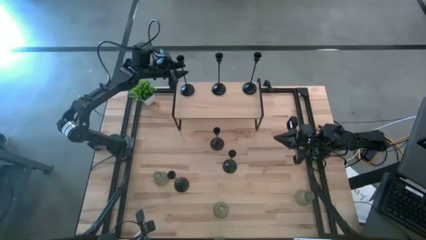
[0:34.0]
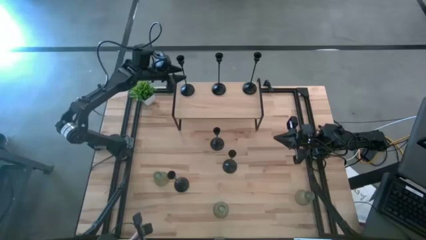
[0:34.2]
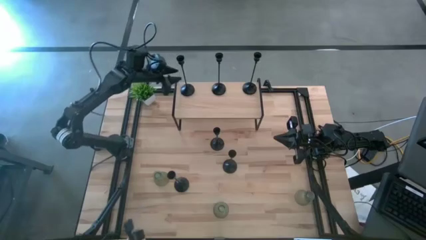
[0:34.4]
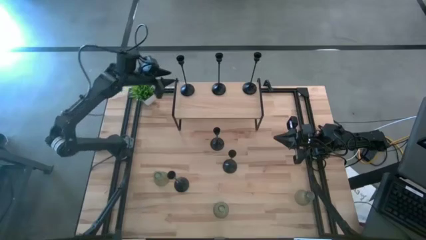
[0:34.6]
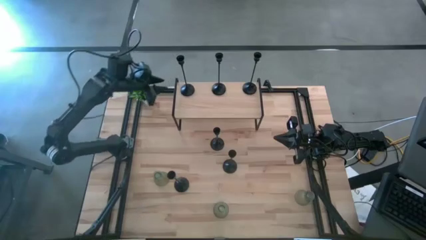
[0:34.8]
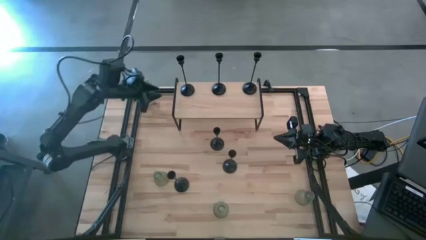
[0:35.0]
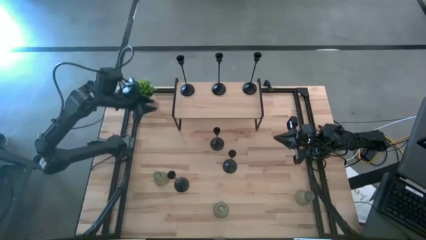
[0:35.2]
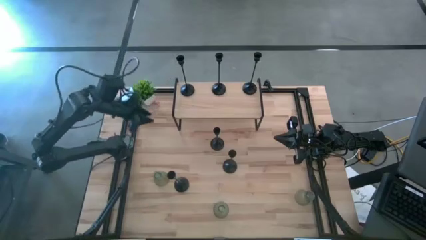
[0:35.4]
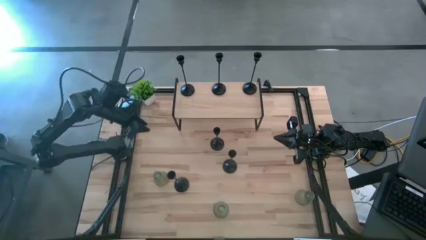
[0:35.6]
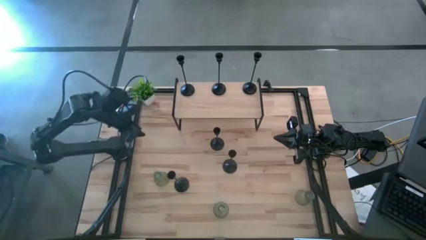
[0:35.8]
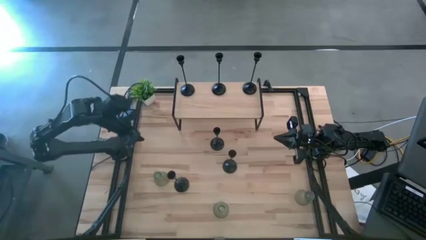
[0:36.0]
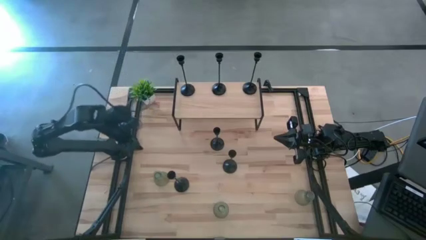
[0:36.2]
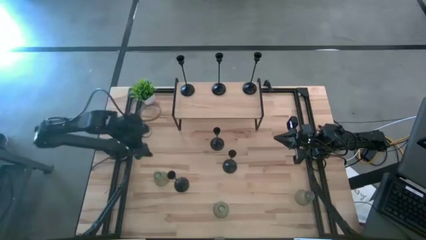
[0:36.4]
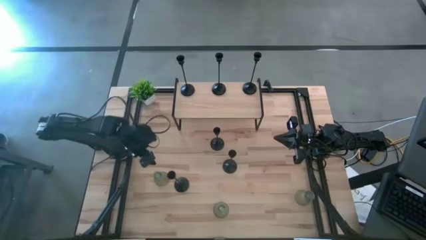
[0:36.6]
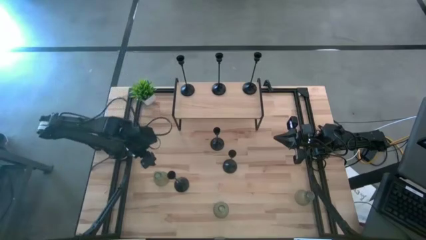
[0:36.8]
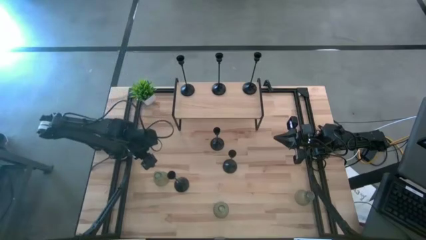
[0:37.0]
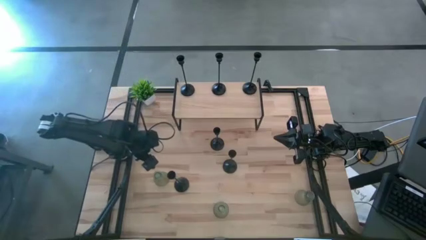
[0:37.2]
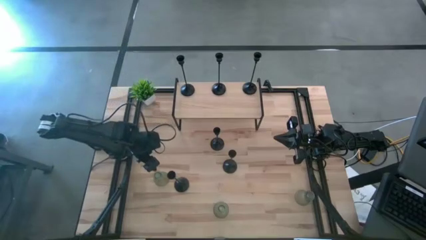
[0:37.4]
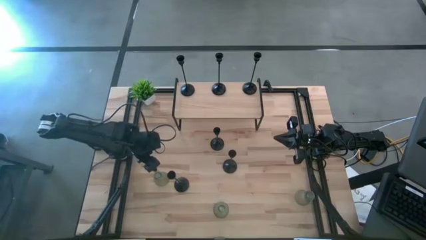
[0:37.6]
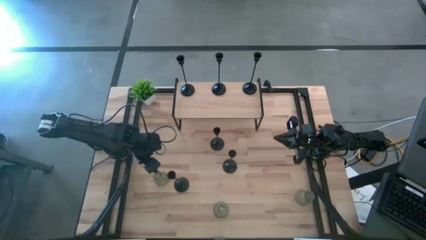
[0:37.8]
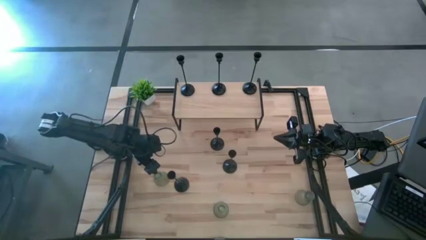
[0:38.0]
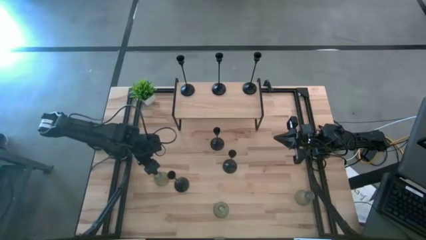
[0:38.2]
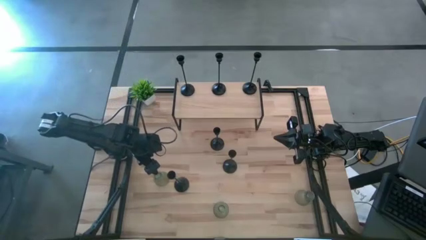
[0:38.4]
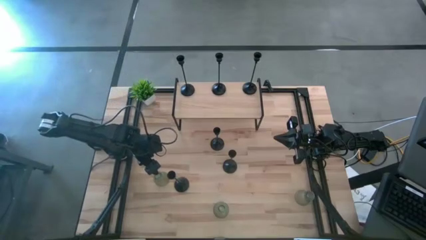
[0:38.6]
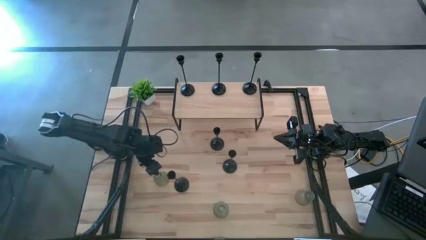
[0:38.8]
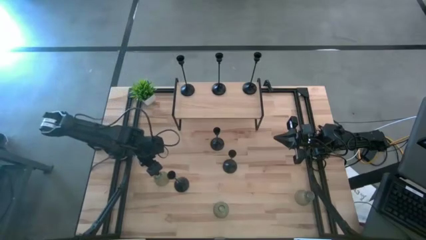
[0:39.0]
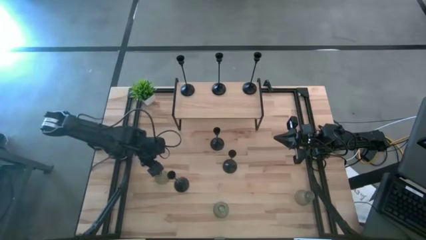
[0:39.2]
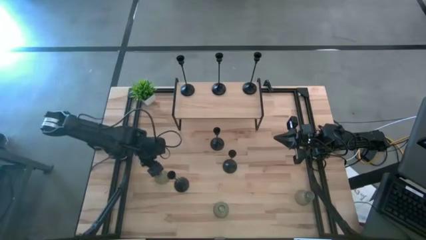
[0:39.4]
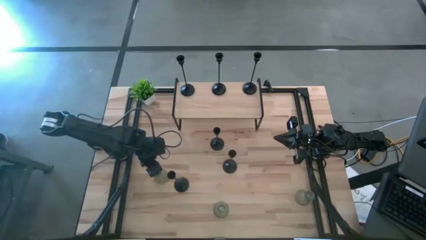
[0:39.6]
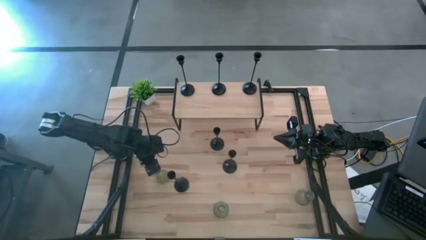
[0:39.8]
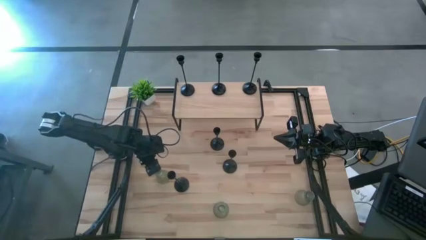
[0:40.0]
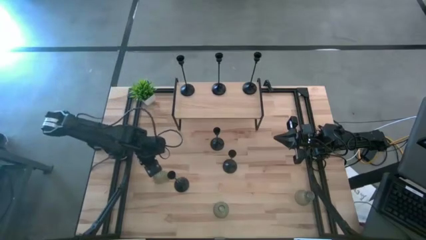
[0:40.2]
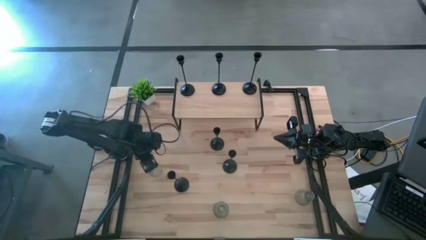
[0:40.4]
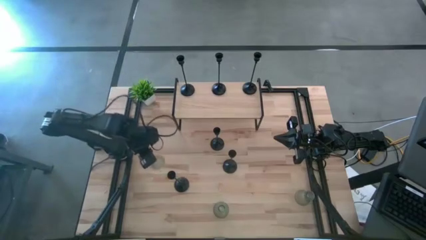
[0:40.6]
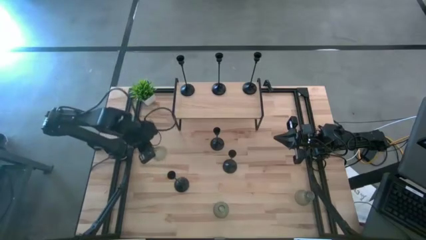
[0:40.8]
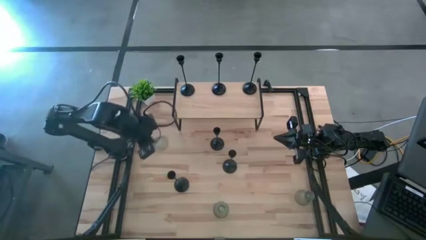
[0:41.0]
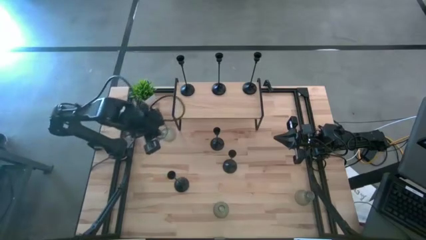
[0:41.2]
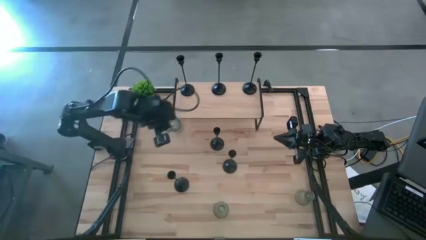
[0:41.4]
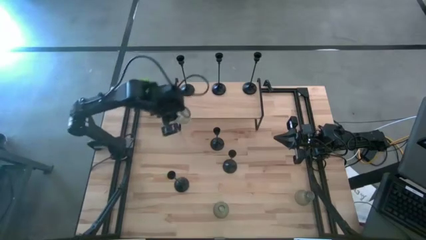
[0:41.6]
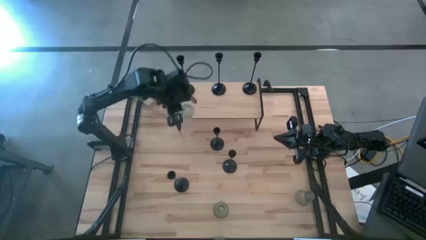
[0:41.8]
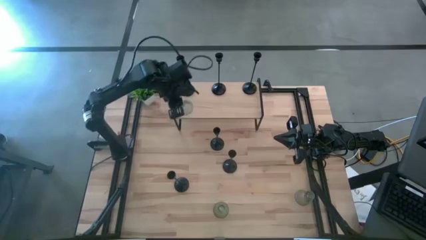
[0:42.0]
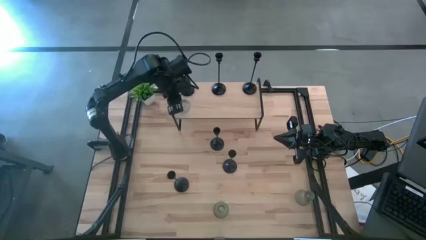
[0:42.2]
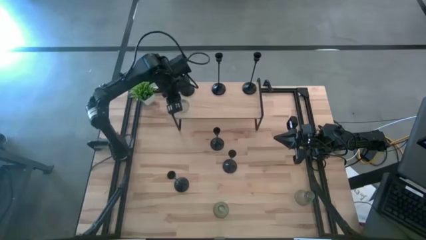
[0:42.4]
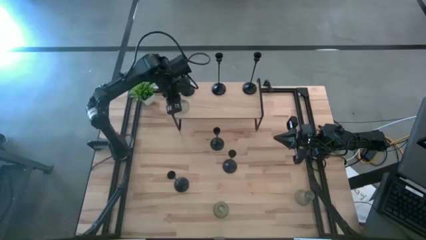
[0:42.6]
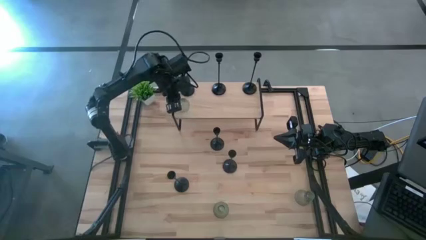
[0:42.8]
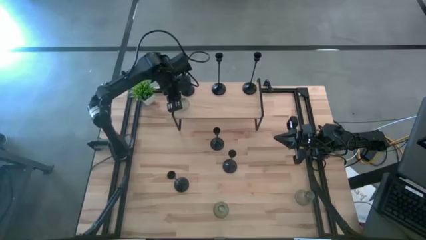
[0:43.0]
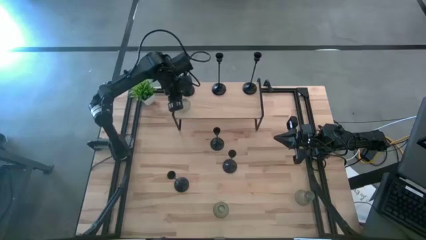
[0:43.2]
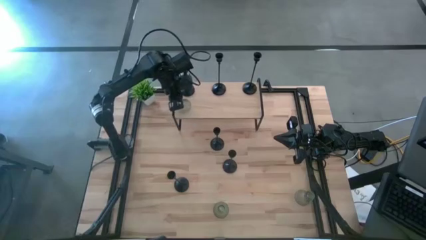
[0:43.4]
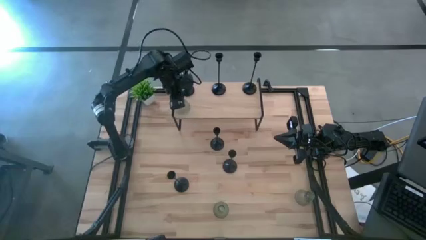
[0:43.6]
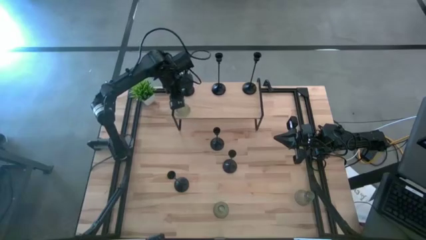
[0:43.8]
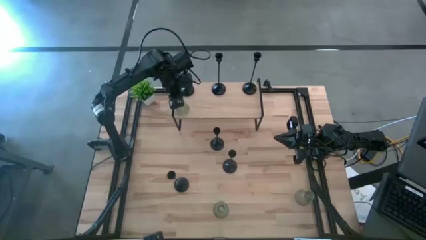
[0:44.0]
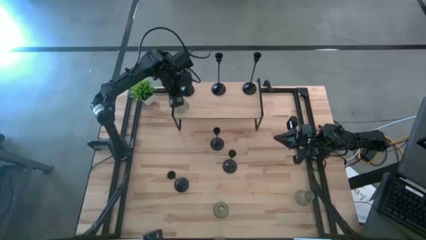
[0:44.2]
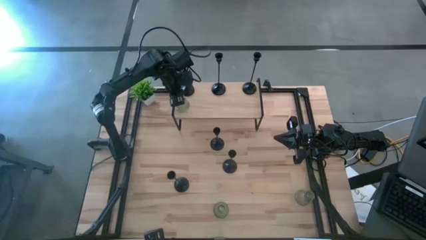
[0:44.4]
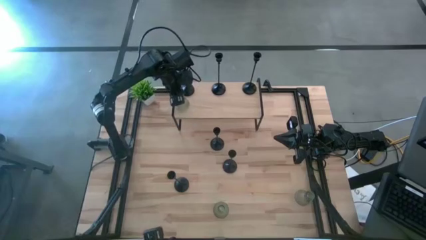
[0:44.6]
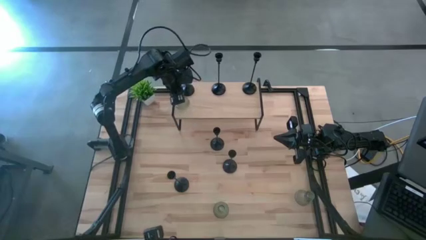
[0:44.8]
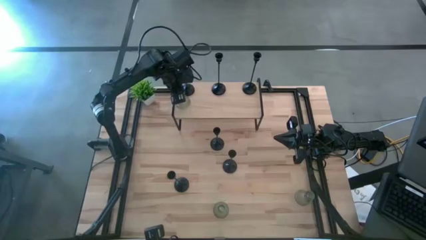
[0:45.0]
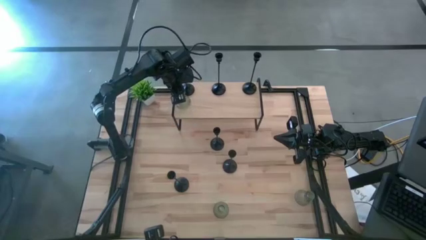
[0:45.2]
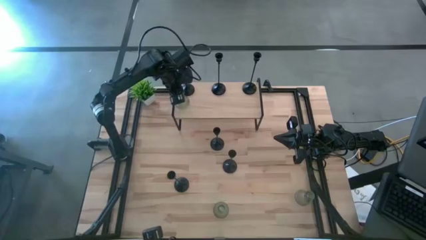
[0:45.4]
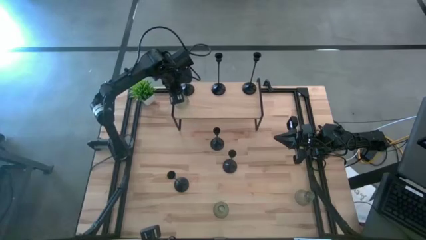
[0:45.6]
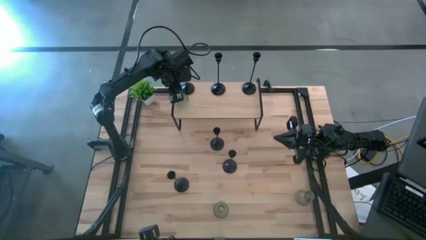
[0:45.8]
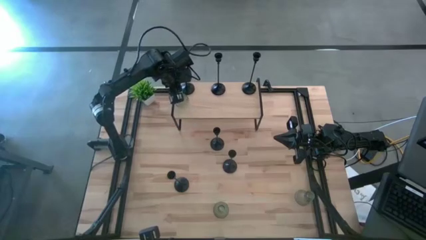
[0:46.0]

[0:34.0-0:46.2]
Task: Pick & Place candle stick holders
Put the green candle holder on the shelf

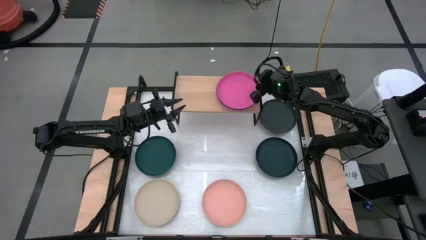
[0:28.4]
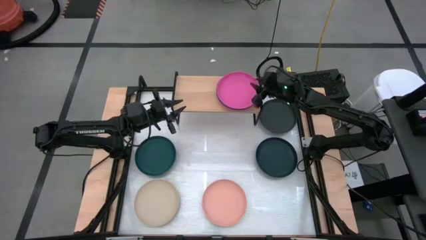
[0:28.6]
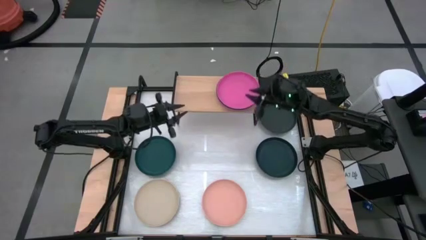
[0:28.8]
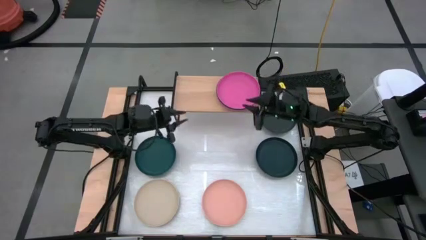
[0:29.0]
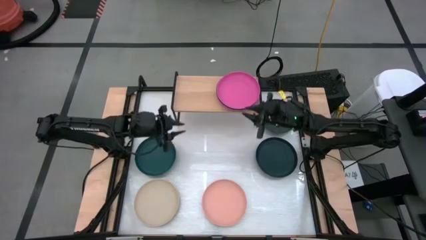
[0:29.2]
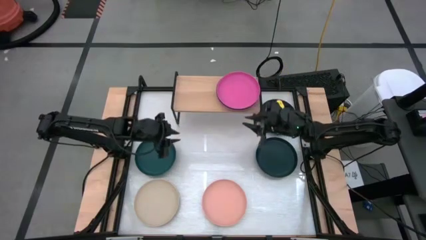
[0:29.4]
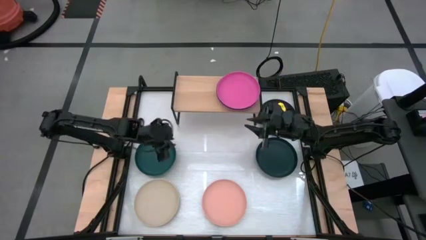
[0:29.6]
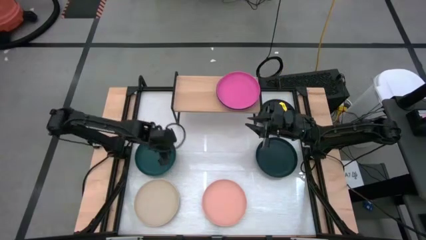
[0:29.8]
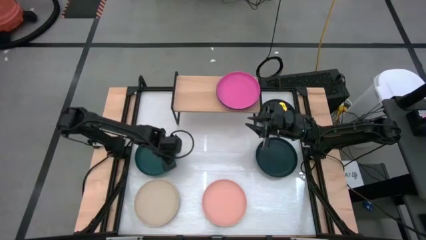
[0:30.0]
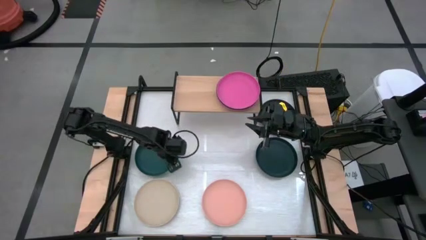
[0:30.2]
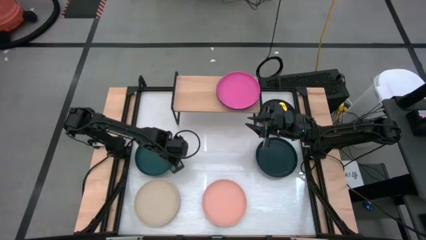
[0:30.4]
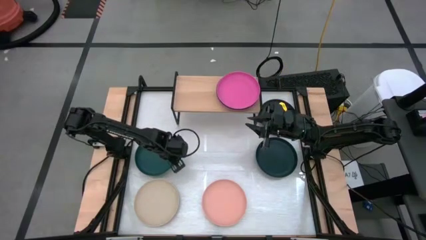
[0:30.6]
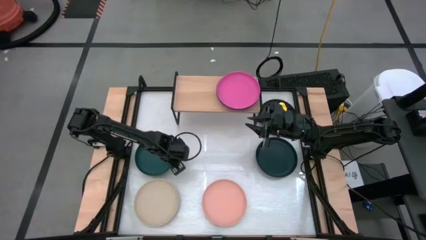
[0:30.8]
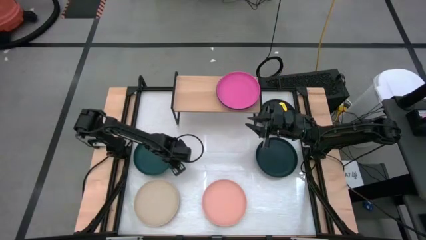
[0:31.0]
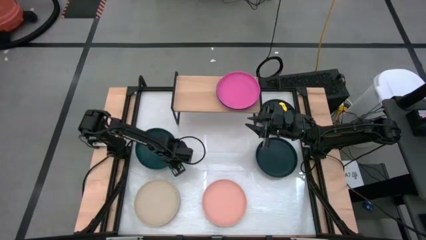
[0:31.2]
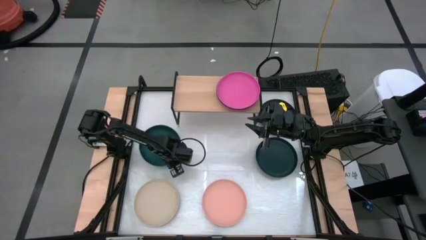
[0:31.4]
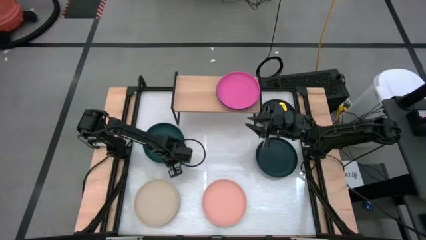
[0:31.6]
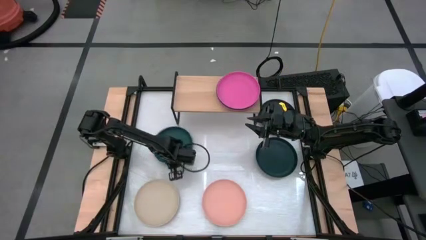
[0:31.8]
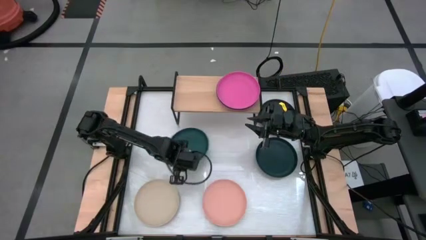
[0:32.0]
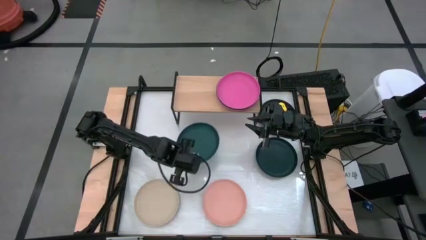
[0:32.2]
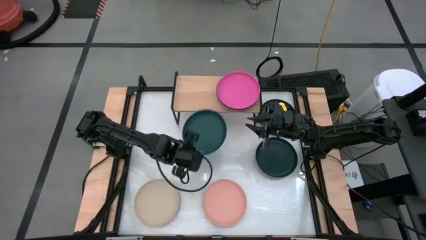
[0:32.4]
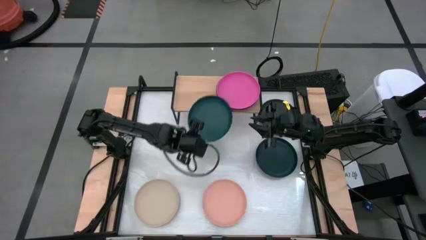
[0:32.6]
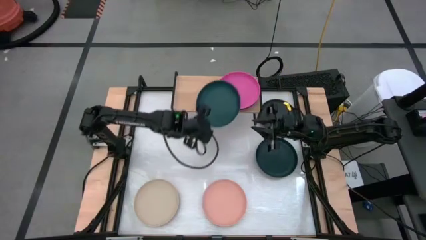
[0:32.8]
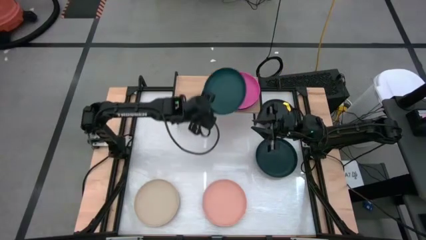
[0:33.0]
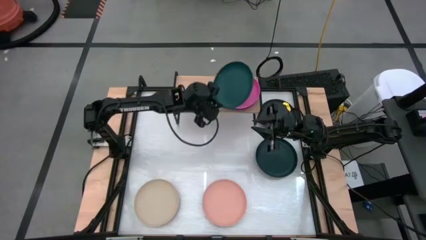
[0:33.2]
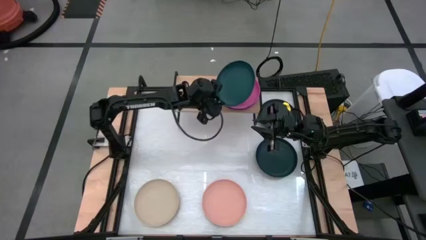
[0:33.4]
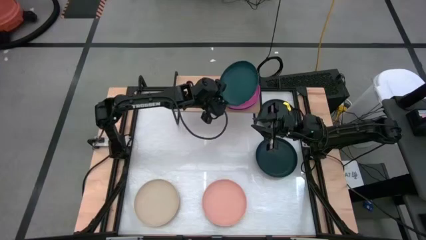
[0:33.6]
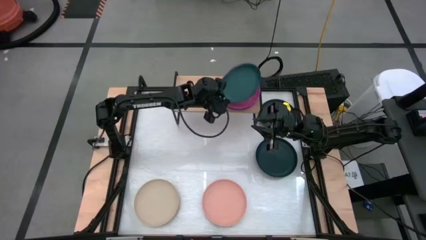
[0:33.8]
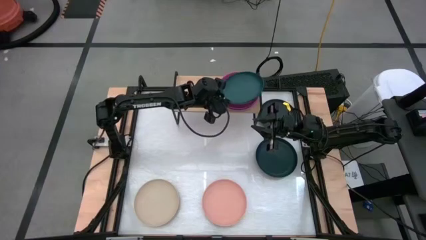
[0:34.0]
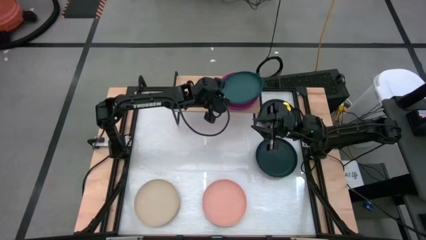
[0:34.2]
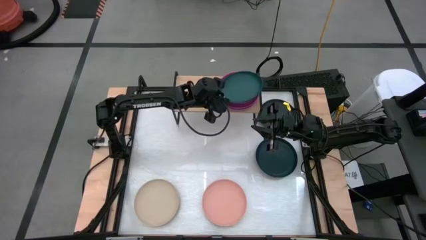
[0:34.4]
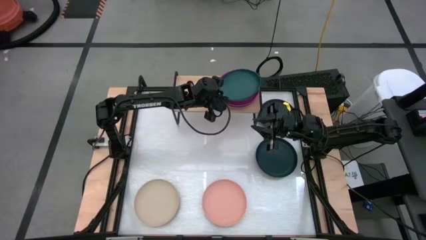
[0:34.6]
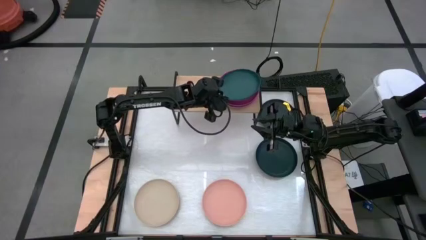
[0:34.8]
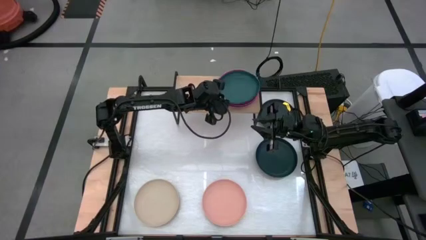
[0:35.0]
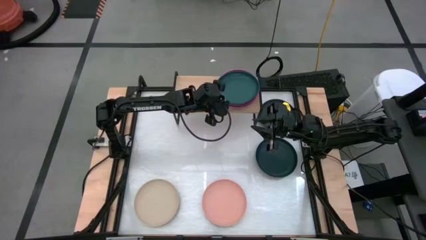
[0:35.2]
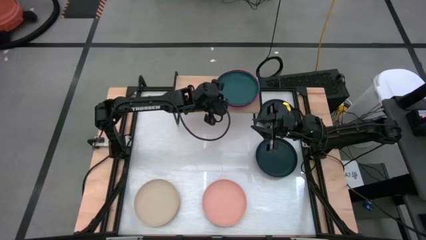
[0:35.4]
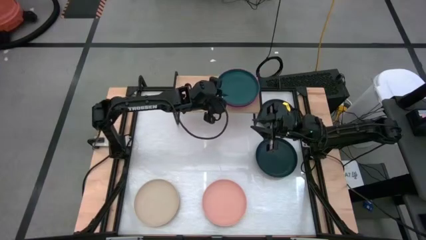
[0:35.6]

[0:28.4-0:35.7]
Task: Place and stack plates onto a shelf
Stack the green plate on top of the pink plate on the shelf
